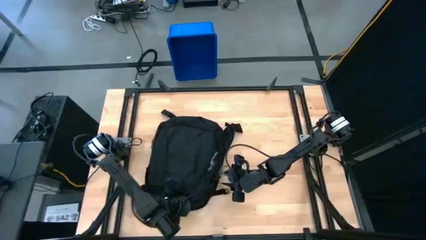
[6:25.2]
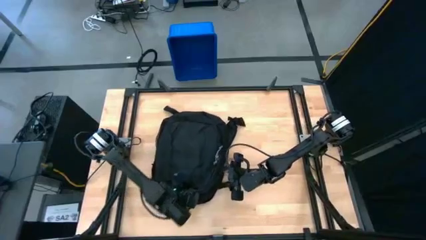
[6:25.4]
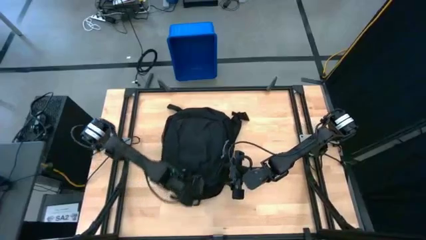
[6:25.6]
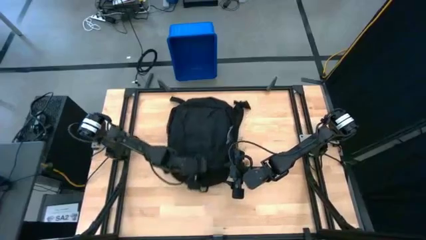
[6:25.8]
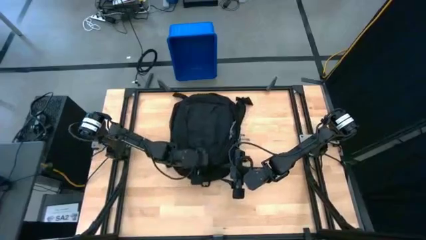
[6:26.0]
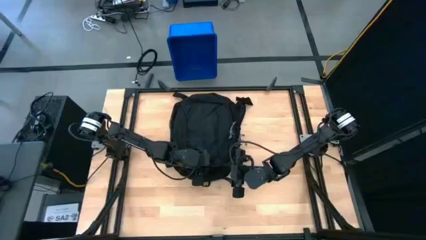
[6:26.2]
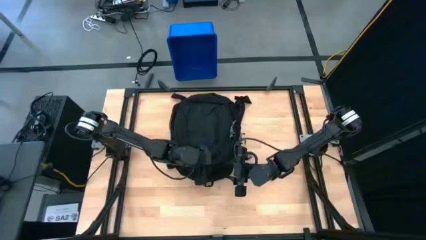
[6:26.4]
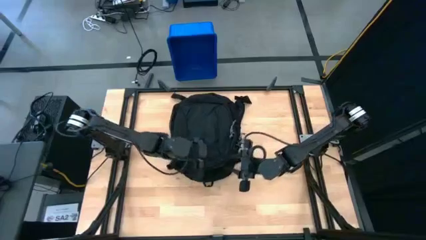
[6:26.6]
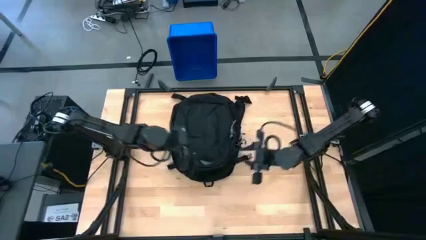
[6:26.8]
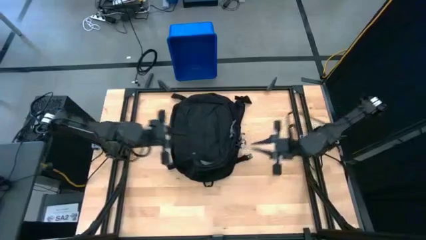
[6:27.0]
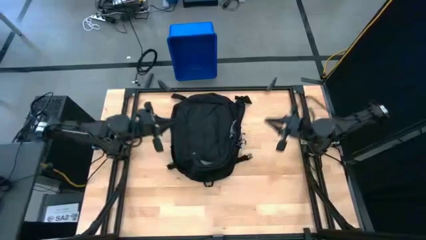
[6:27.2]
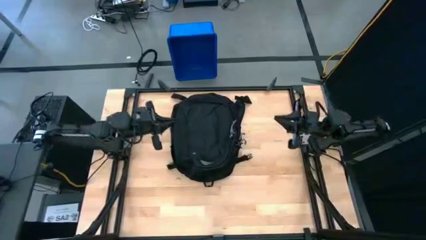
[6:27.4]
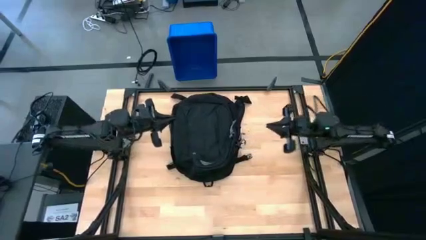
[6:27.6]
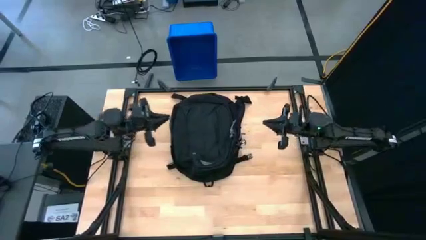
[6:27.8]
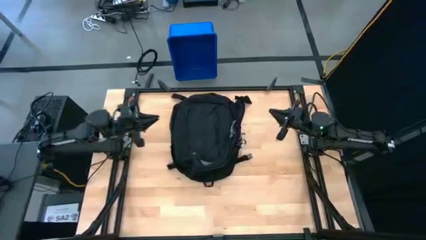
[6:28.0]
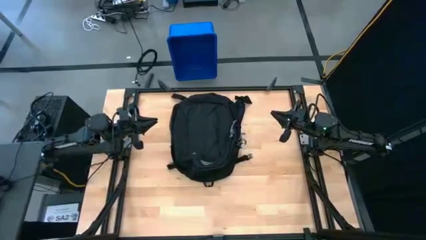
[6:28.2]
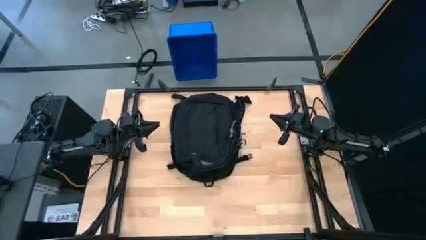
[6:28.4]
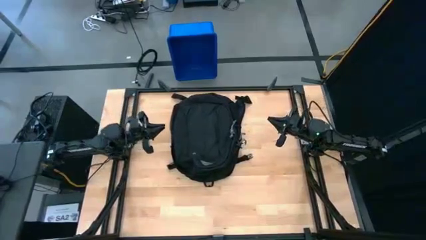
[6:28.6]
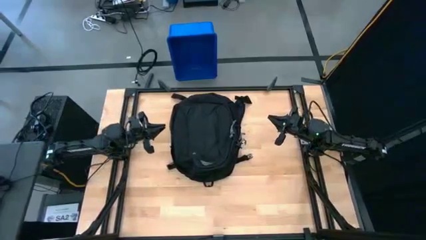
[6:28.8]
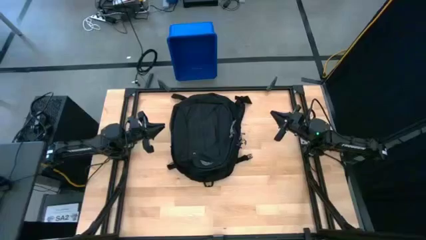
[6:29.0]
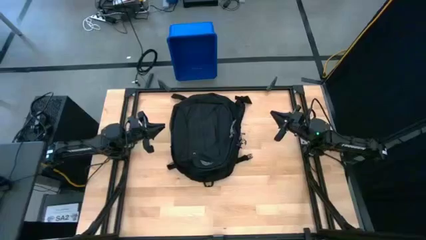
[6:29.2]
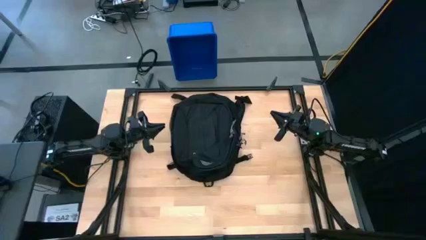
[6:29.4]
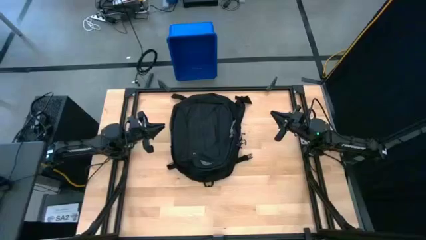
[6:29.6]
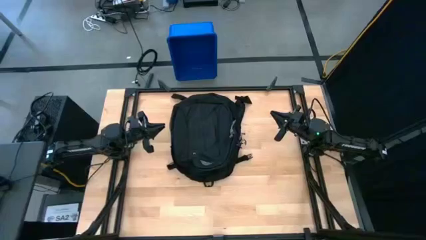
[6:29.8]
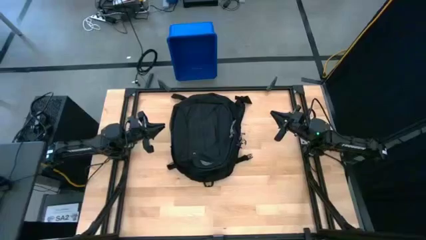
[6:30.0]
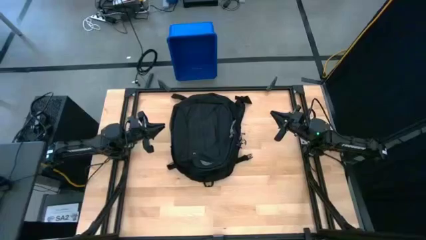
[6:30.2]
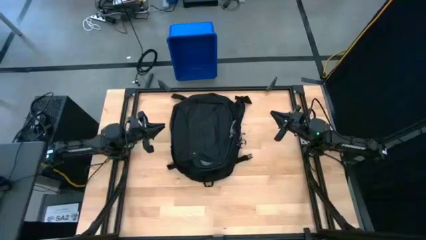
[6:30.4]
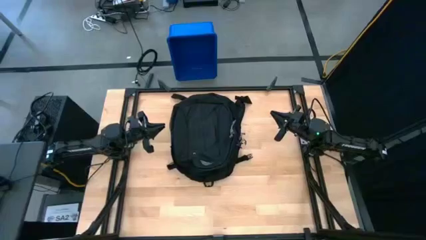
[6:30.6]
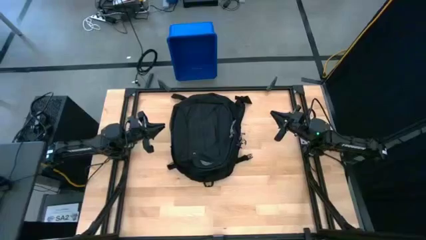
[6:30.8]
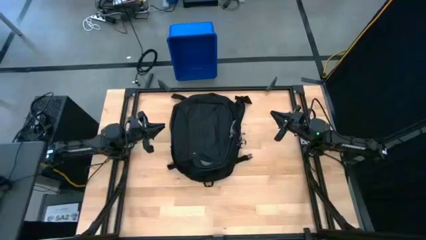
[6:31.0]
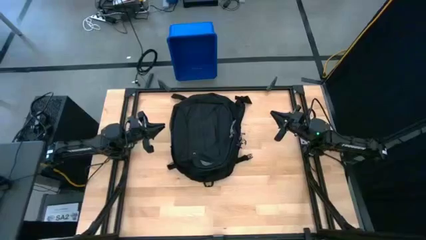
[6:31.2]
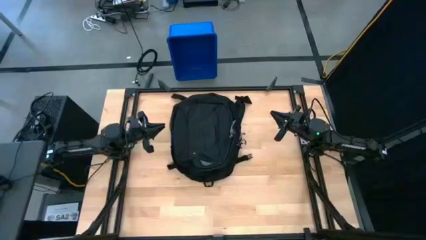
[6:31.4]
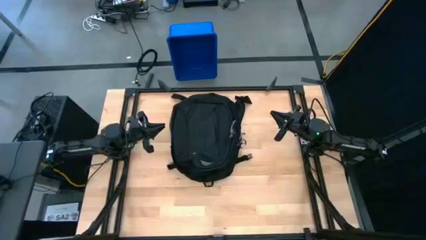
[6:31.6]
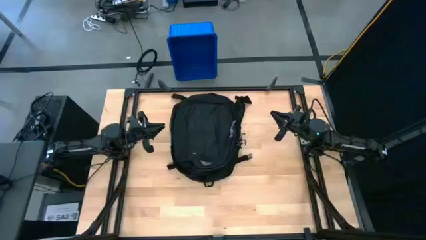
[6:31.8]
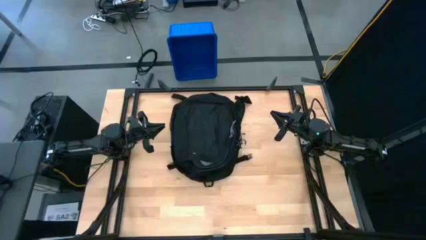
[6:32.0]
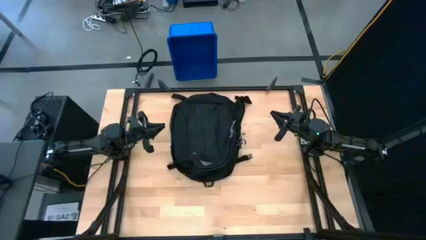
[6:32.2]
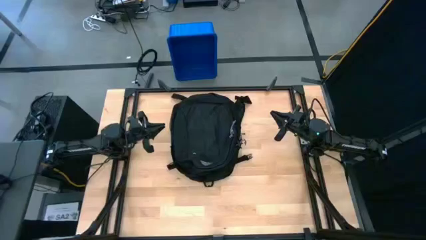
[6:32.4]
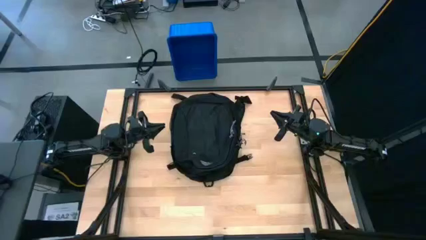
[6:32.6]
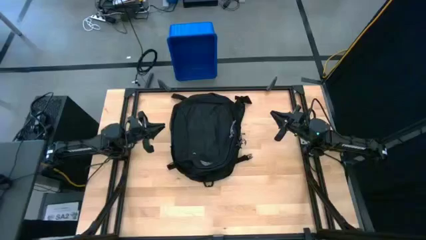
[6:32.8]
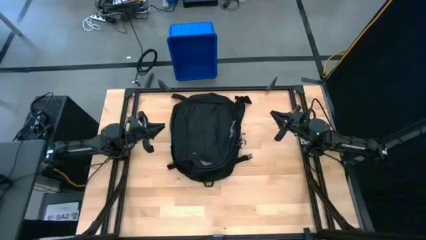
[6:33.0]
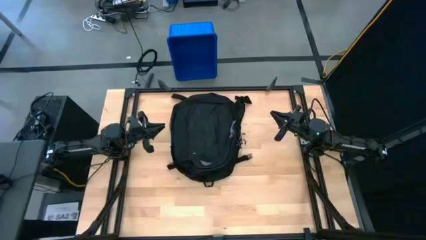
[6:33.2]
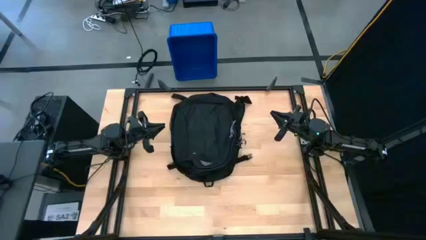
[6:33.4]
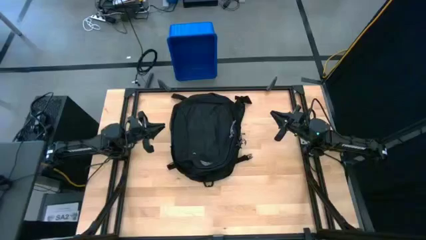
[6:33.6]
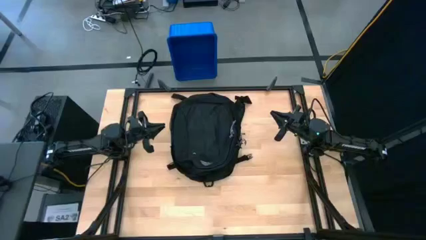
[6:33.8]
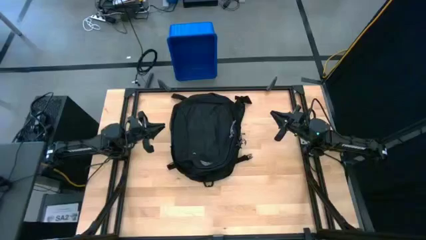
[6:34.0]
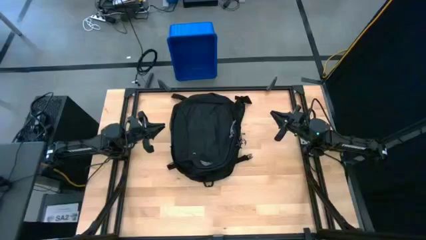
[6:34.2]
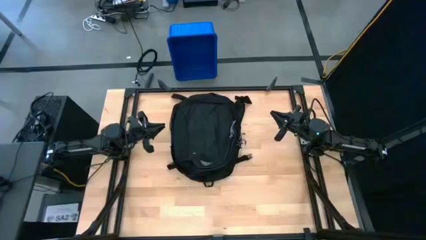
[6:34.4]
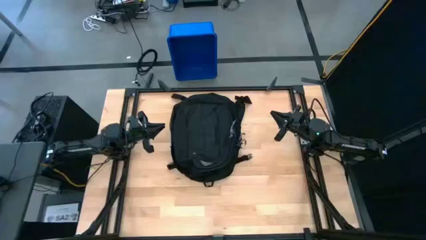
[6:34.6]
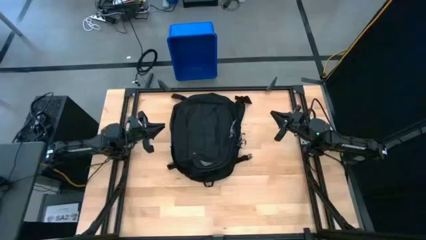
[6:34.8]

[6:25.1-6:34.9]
Task: Unpack backpack
Return to home position

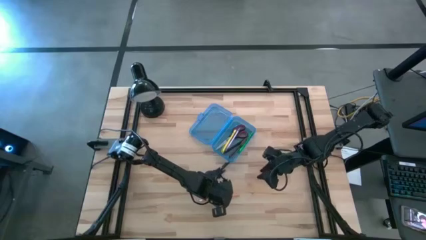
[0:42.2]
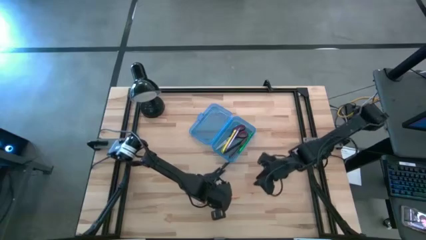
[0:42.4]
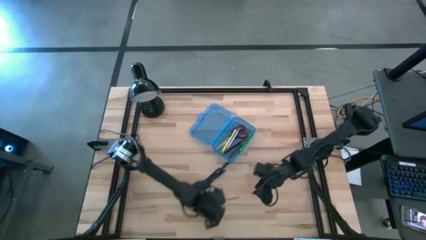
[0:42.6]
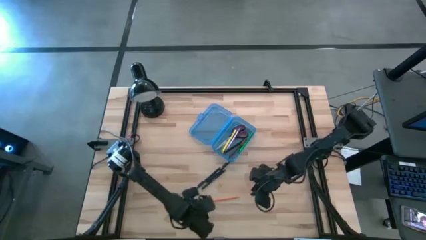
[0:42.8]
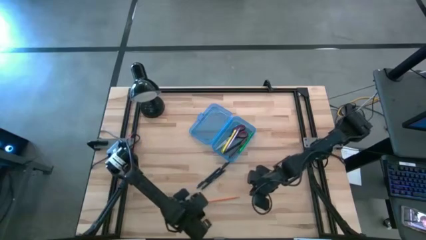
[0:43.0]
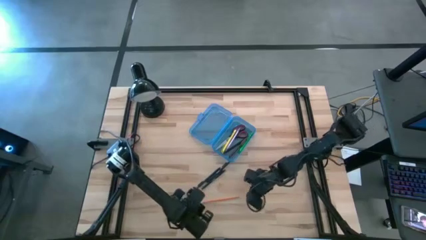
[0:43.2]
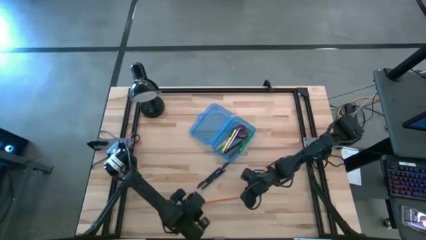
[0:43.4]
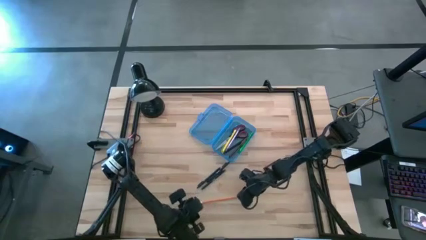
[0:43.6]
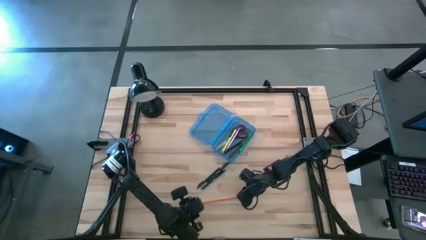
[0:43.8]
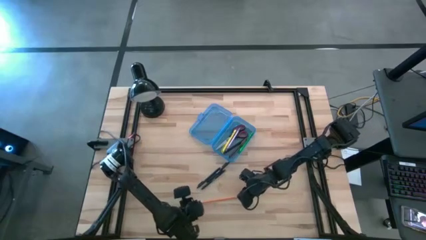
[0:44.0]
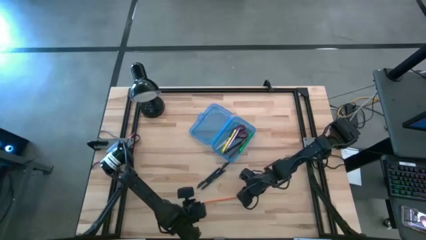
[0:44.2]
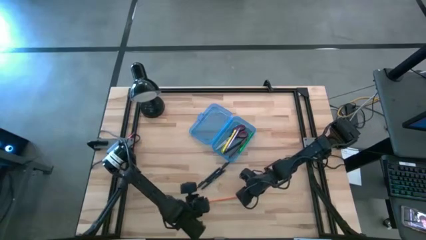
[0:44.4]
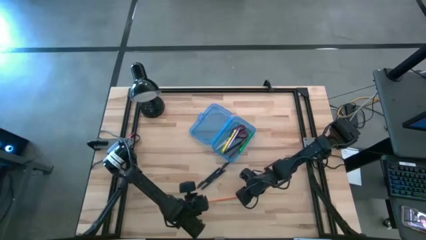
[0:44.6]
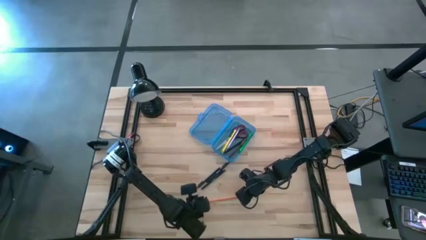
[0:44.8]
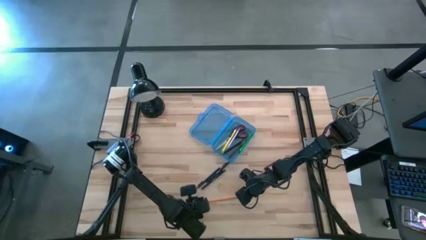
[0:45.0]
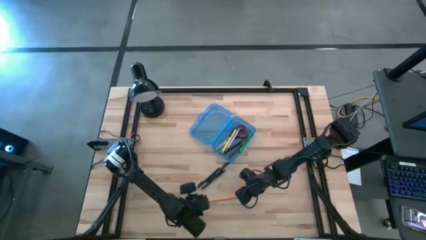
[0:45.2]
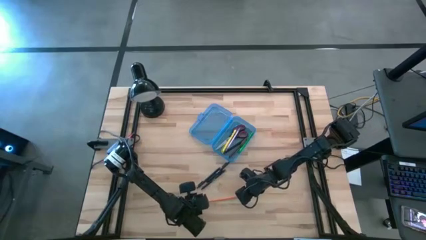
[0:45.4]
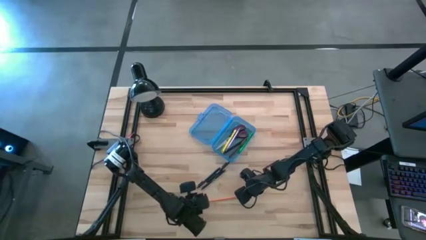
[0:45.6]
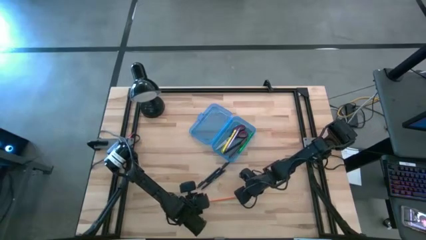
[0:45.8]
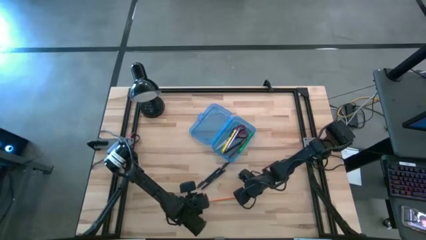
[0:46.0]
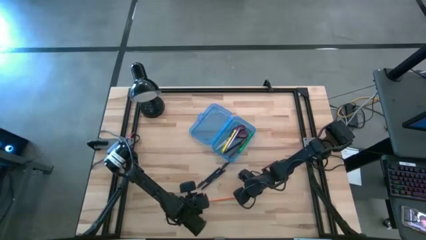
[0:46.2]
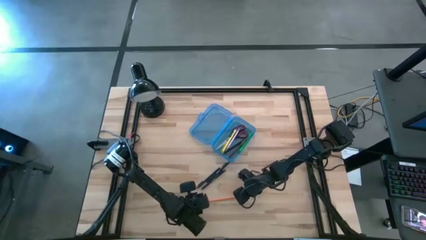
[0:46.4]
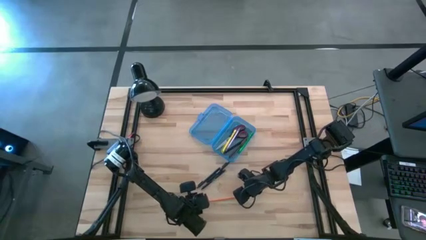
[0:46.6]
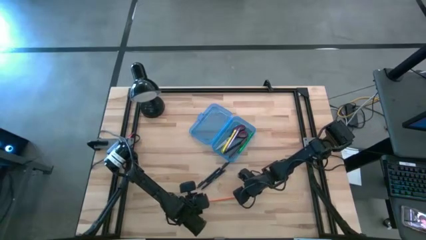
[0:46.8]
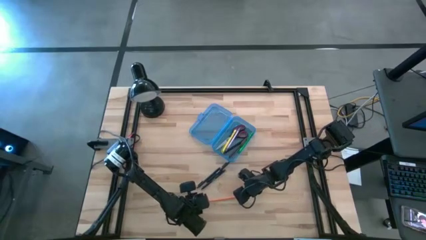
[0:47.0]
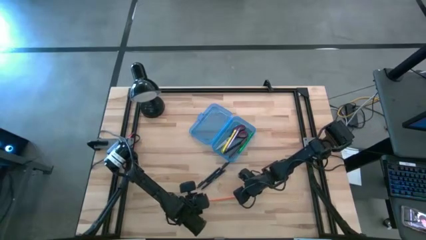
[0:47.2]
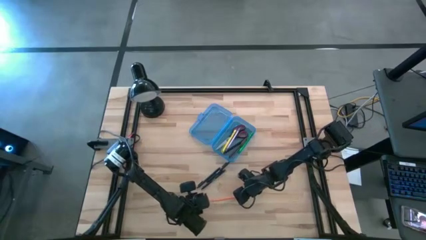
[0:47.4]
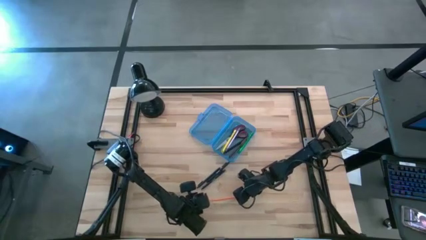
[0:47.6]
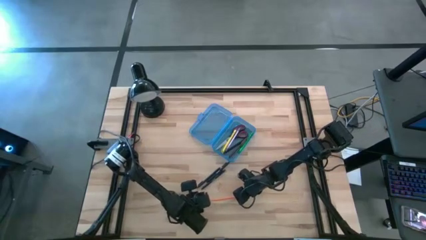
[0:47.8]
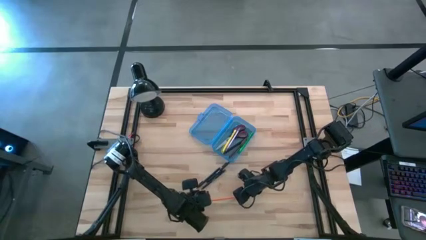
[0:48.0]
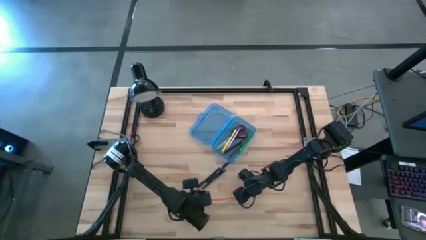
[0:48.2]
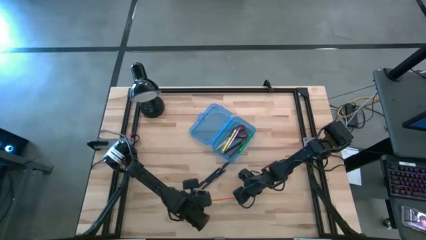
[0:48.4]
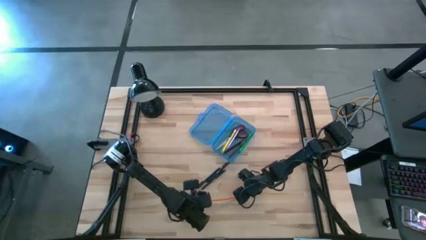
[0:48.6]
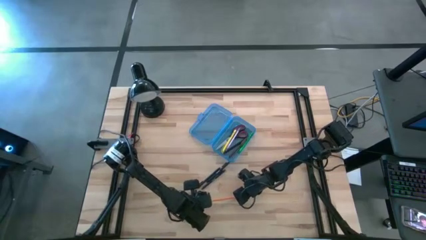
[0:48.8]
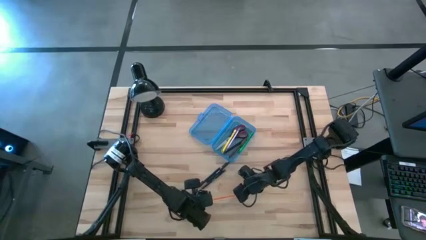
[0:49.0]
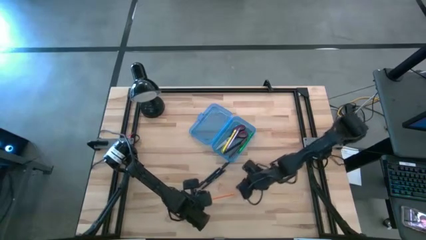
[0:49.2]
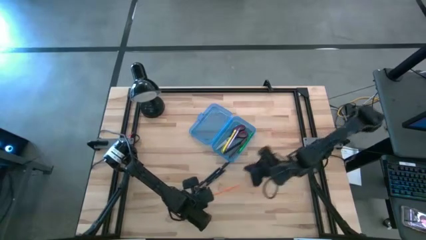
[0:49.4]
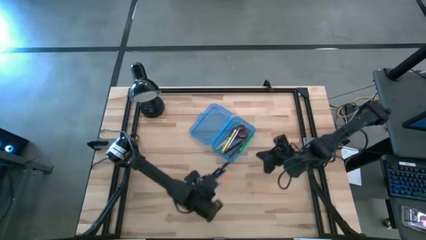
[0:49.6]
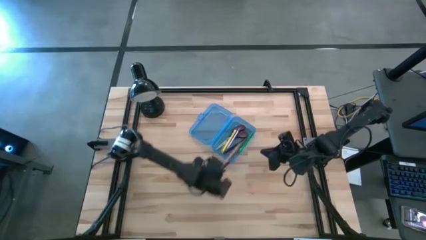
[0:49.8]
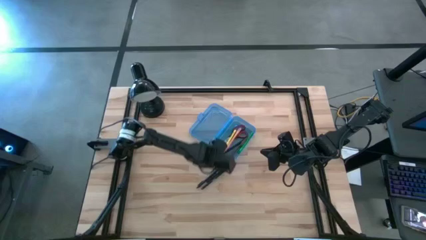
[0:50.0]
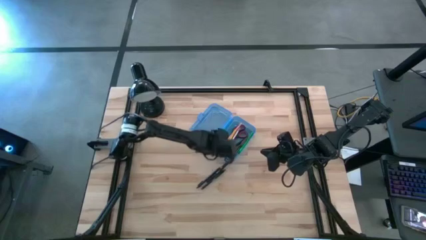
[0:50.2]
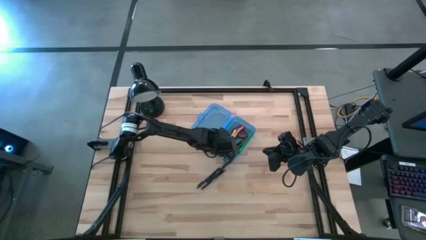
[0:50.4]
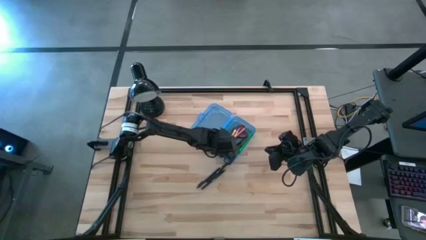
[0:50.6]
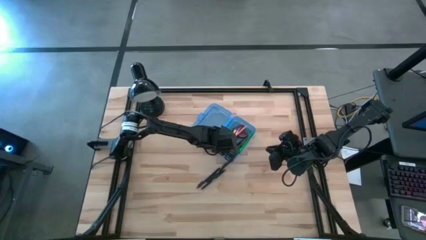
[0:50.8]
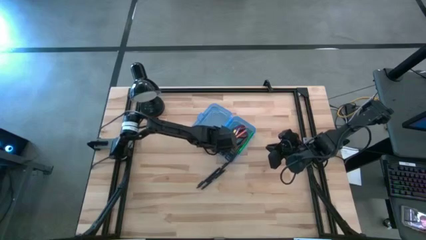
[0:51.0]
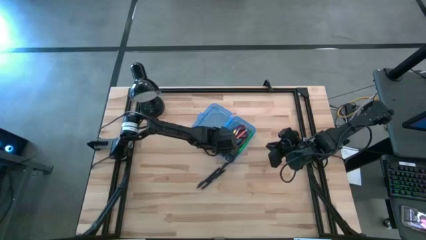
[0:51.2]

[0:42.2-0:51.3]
Task: Pick & place school supplies into a supply box
Put the pencil into the supply box
